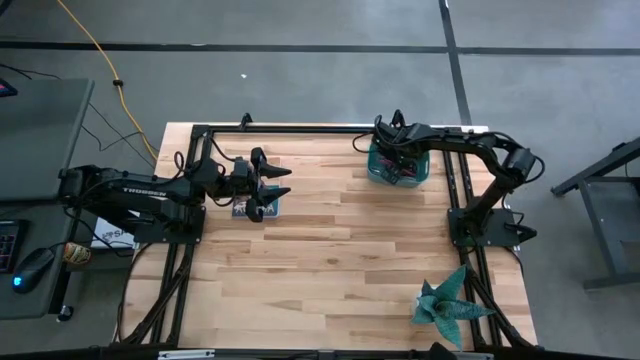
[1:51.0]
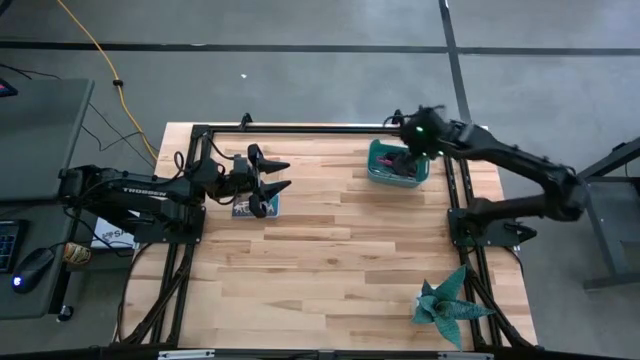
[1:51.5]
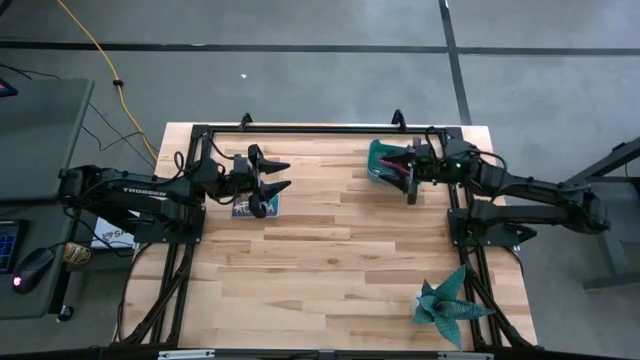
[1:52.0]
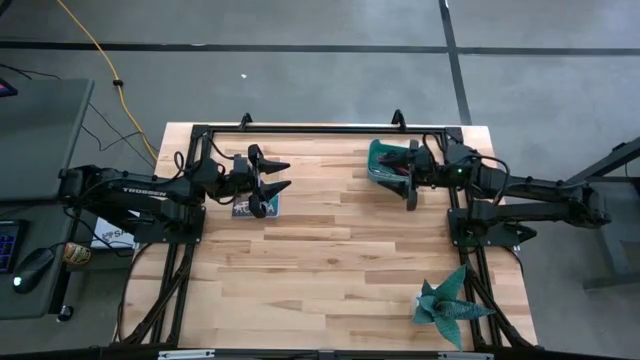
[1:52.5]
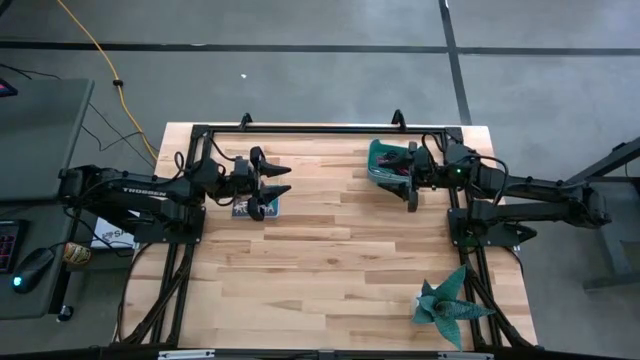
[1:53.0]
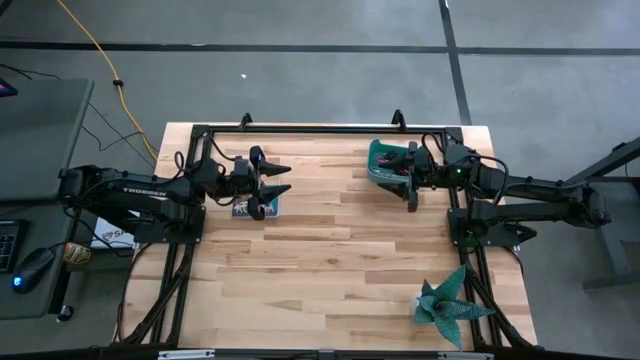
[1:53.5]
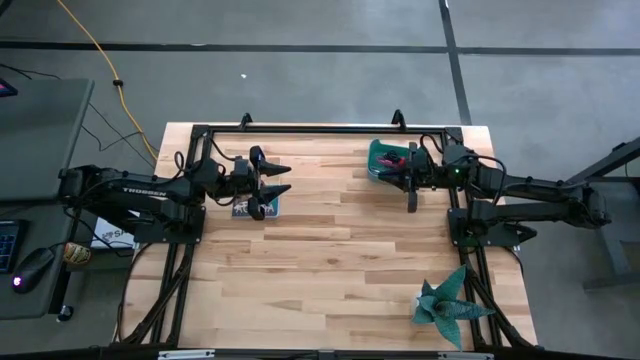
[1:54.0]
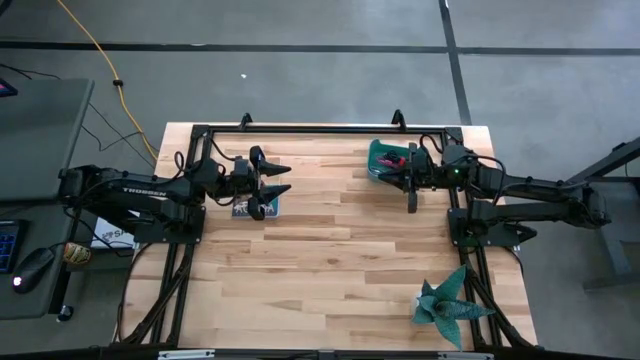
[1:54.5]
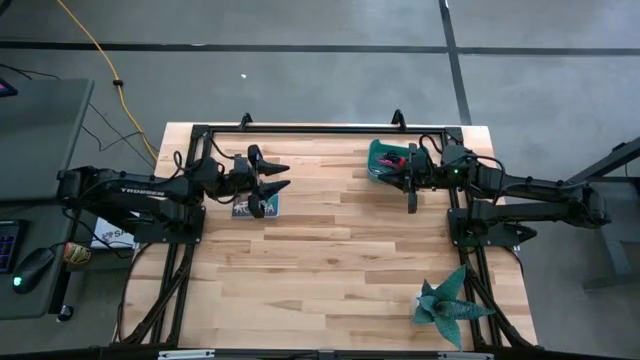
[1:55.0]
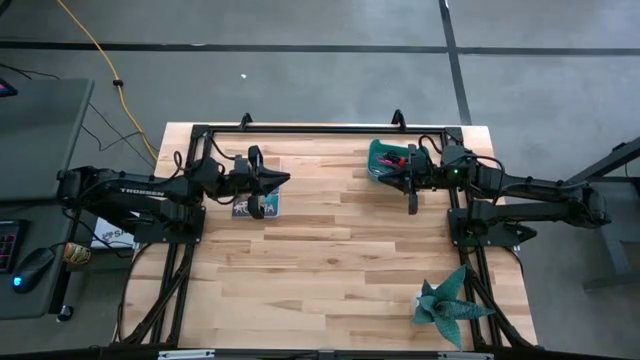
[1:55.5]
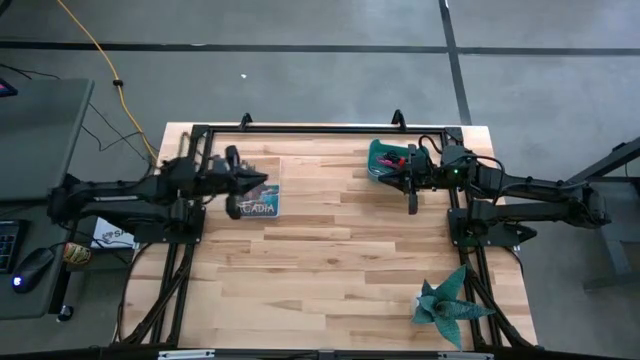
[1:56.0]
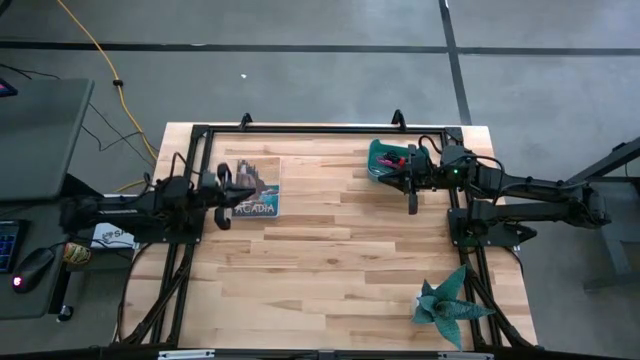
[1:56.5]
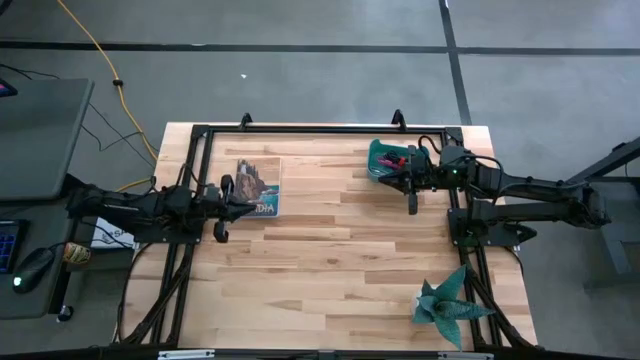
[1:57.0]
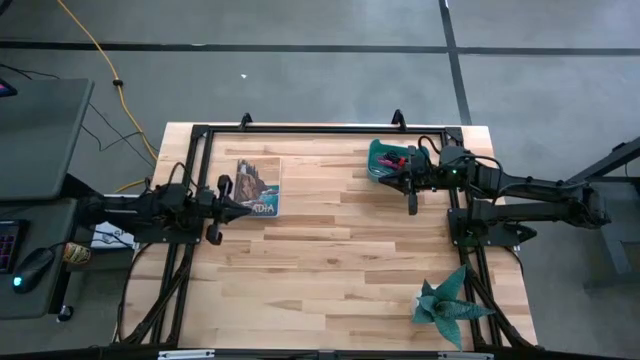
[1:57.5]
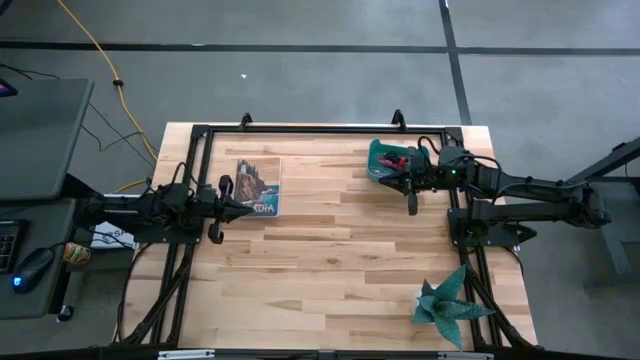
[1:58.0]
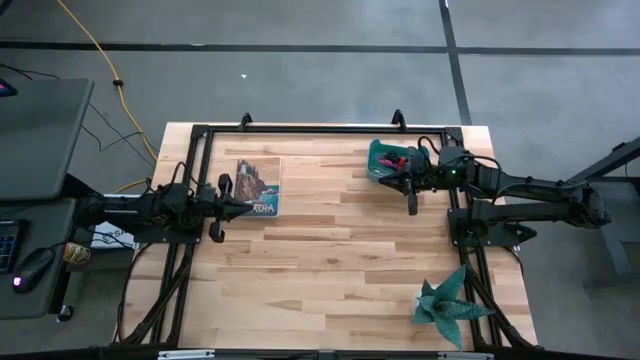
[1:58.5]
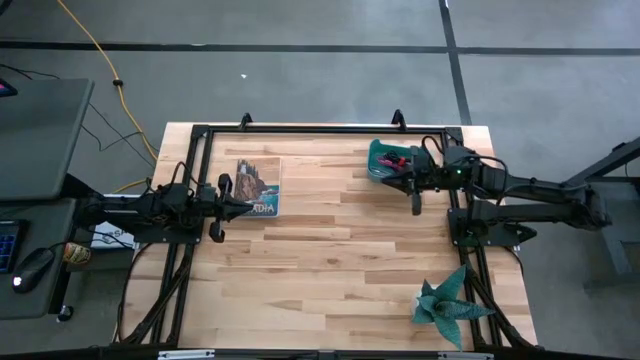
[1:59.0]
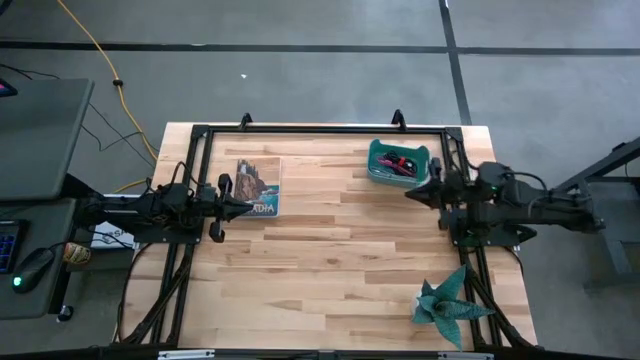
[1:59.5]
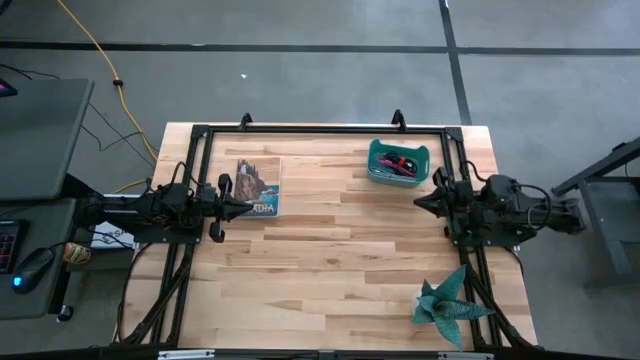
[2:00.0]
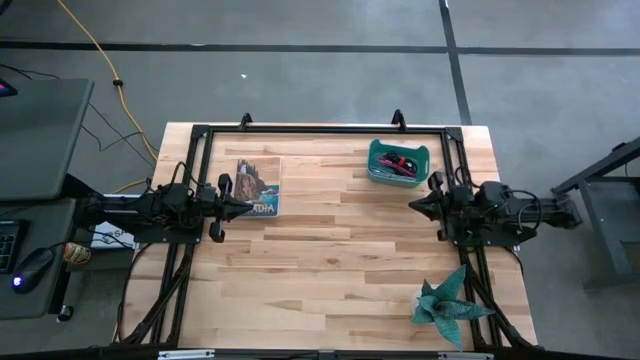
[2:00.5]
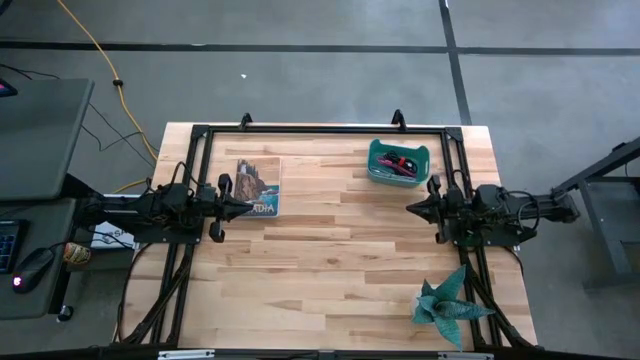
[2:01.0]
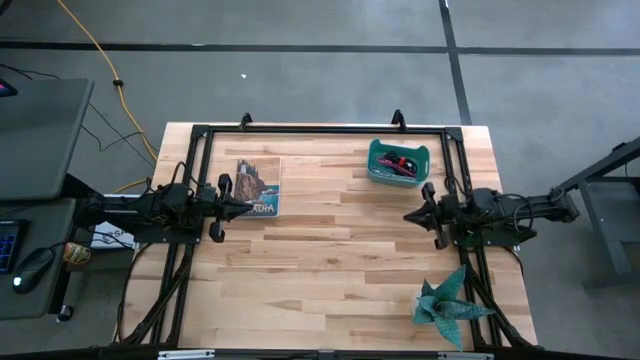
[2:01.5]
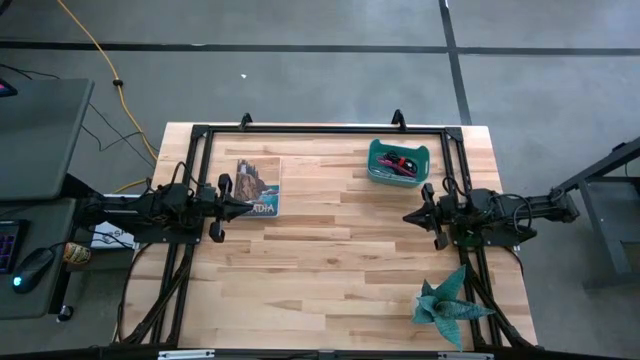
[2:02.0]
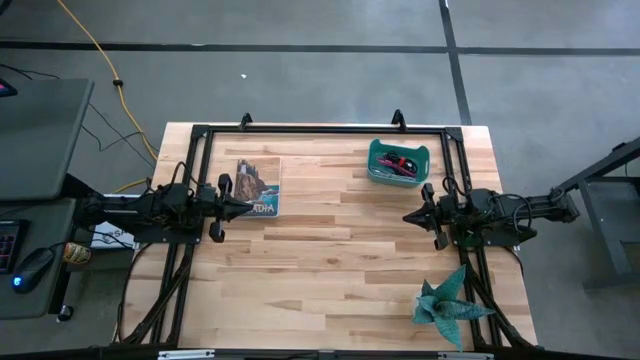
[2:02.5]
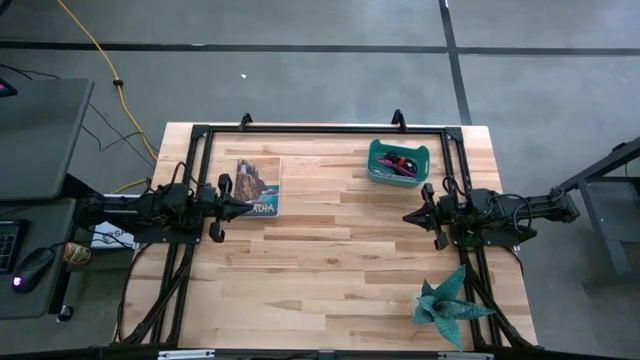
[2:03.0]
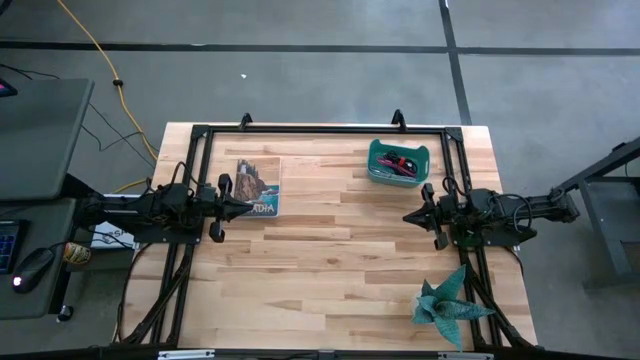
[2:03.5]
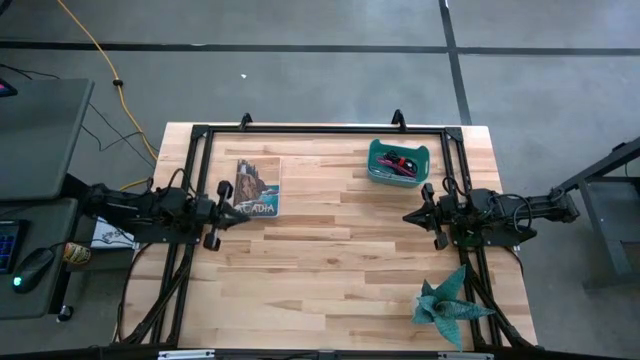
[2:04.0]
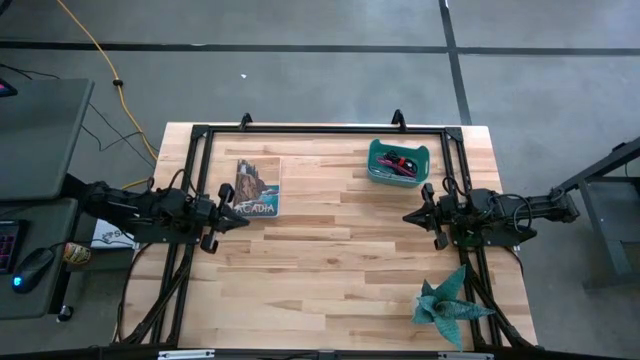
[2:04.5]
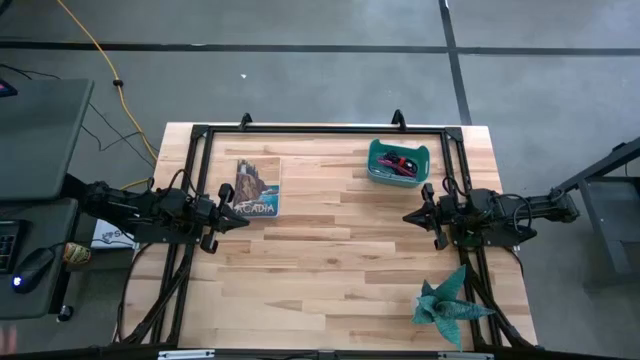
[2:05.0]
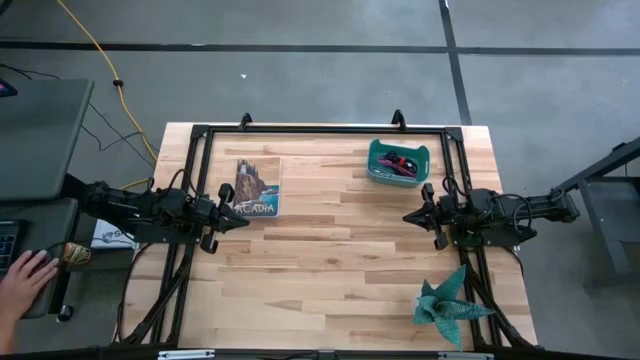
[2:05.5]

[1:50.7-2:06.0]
Task: Pick and place USB-C Cables
Return to Home Position

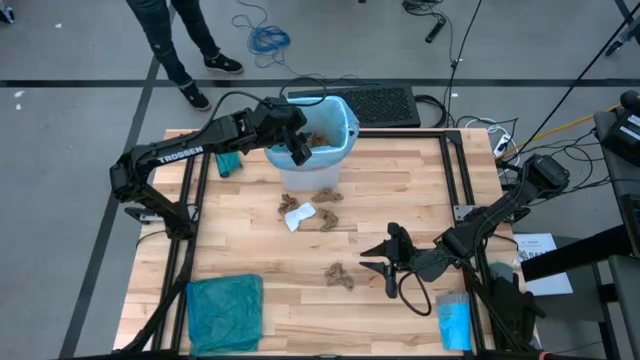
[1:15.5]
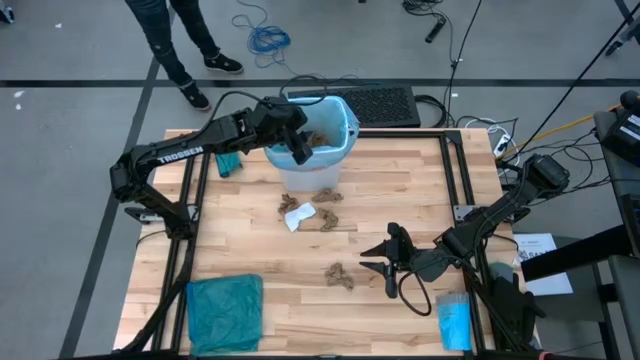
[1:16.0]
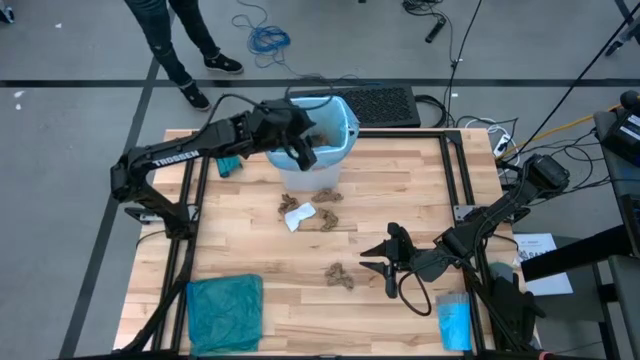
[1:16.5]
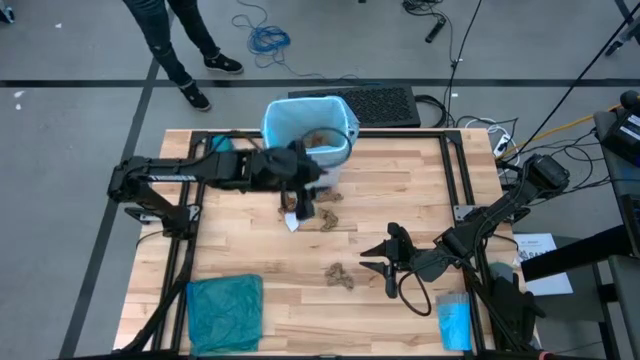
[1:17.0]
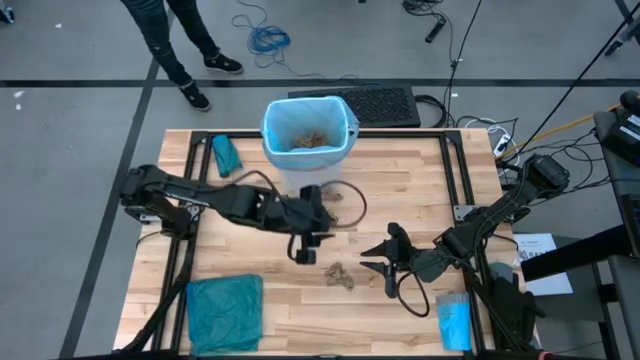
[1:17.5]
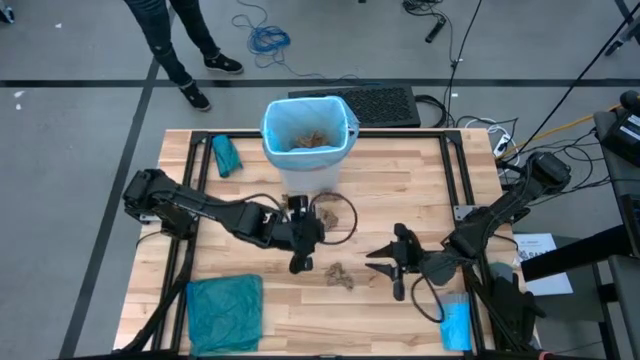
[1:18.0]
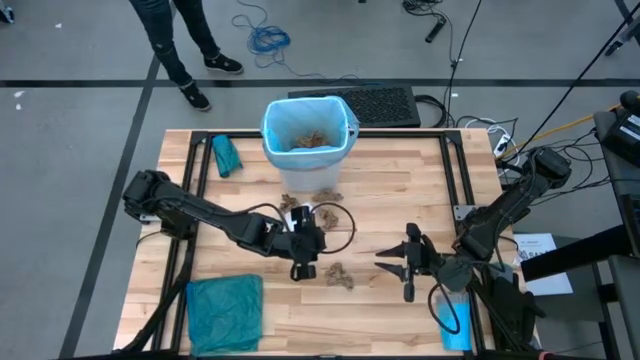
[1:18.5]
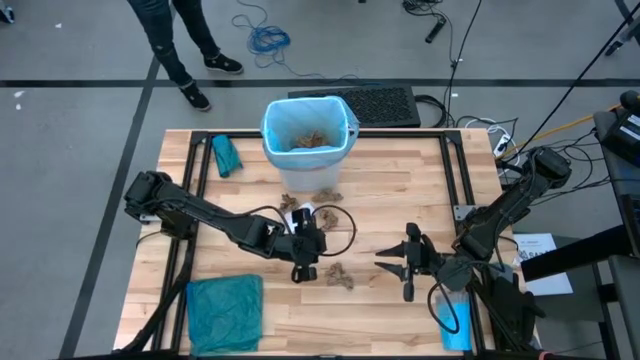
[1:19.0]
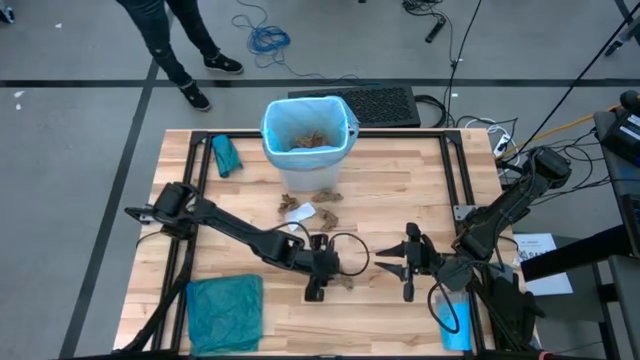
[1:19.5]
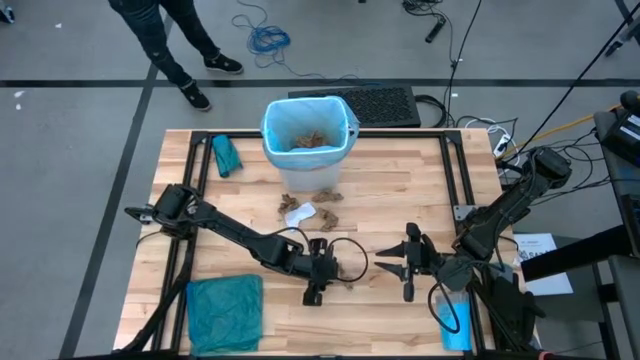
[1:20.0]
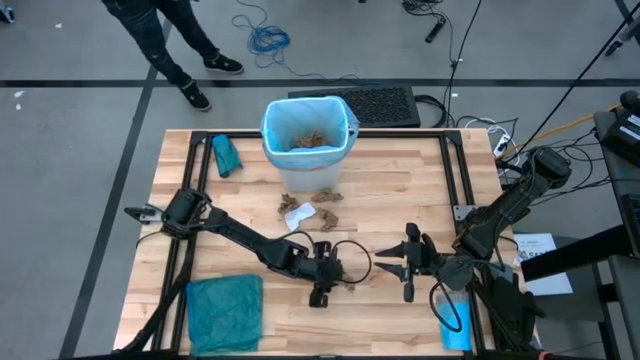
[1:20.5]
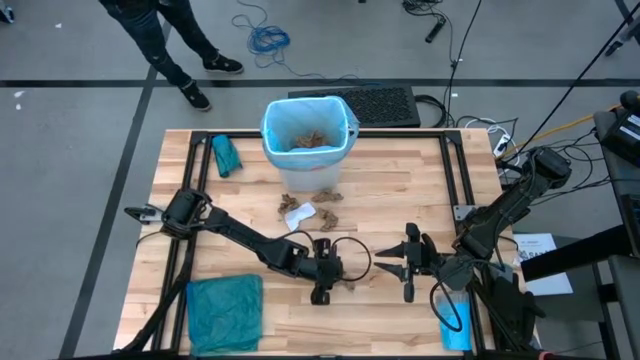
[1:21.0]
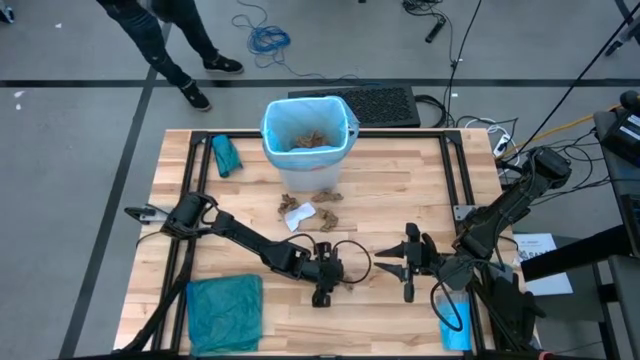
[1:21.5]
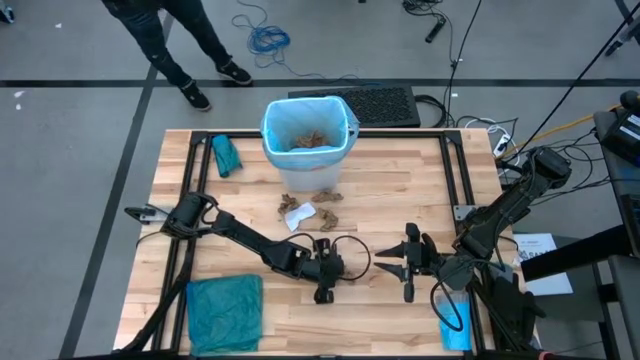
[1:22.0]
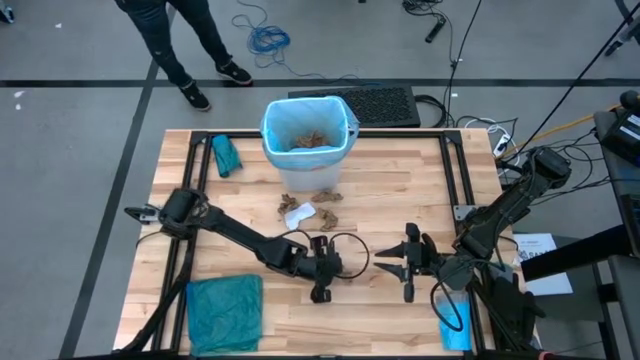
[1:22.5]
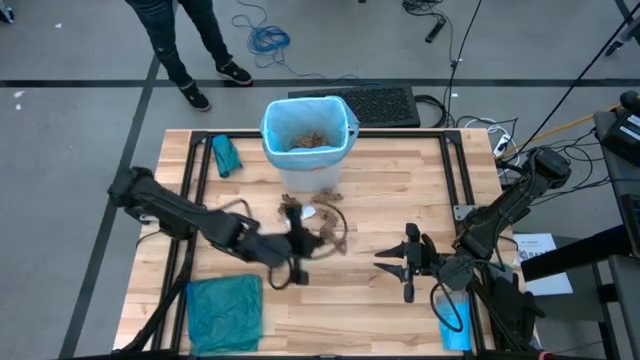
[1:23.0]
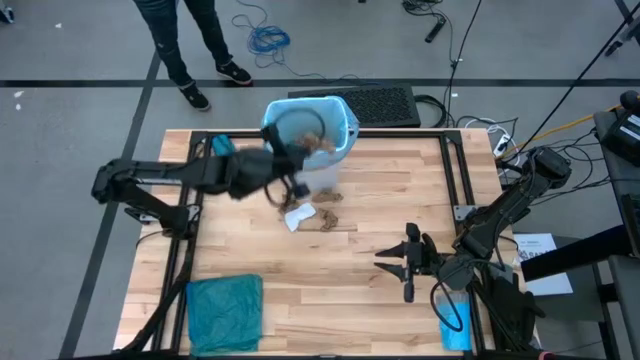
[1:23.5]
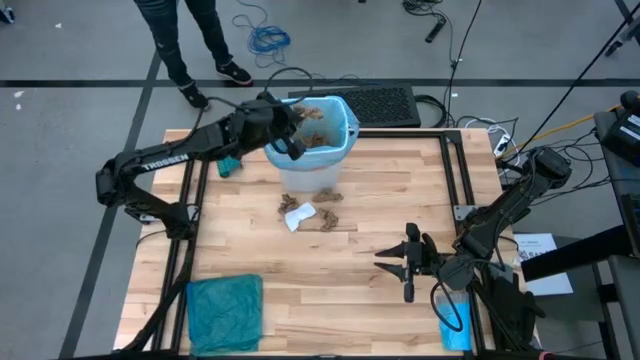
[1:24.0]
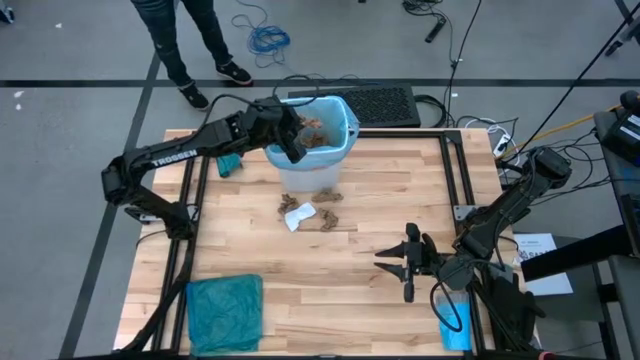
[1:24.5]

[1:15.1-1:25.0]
Task: place trash/remove bag and relplace
Put the brown paper into the blue trash bag inside the white trash bin
